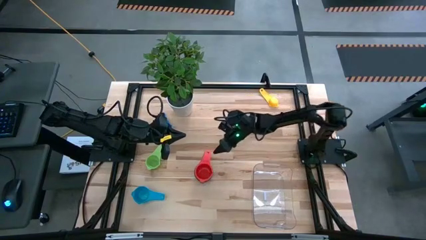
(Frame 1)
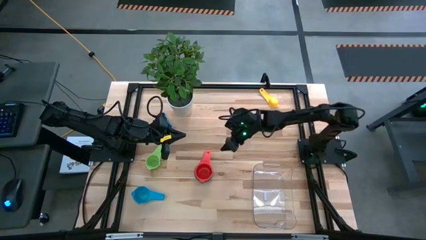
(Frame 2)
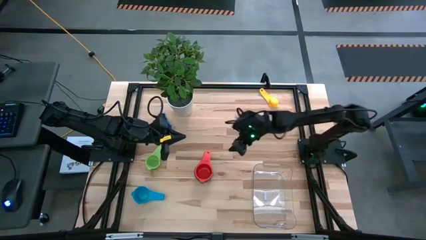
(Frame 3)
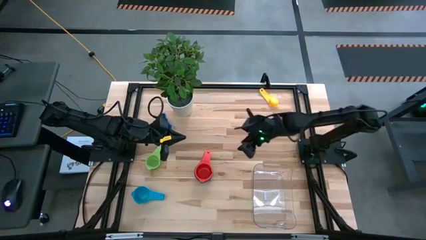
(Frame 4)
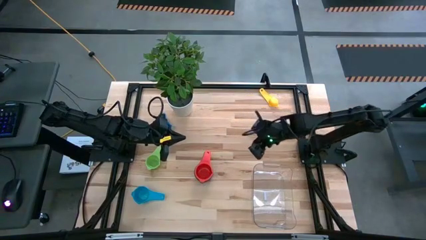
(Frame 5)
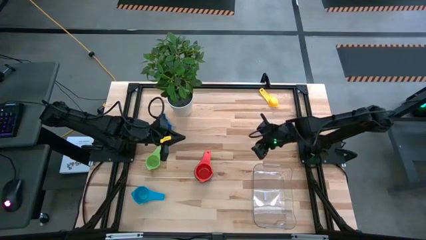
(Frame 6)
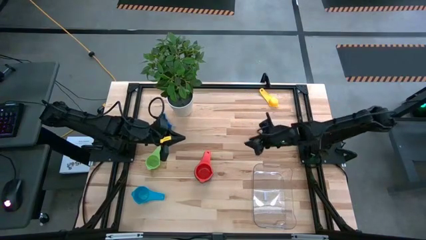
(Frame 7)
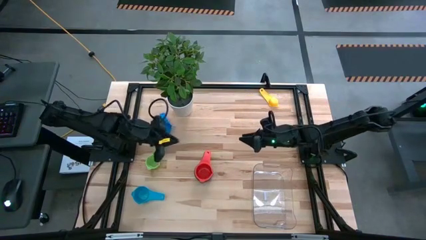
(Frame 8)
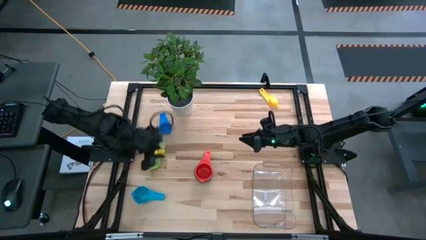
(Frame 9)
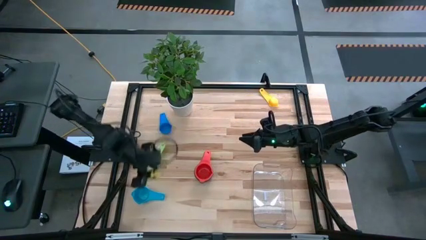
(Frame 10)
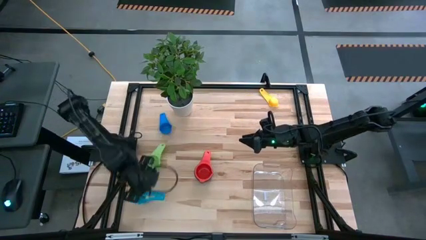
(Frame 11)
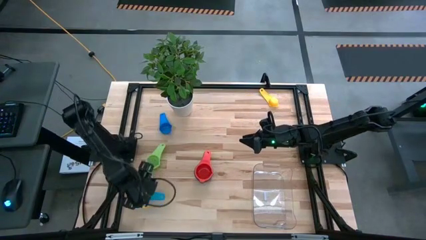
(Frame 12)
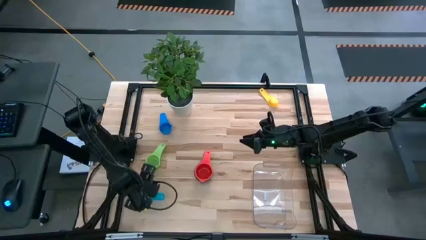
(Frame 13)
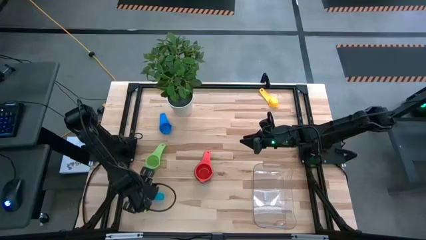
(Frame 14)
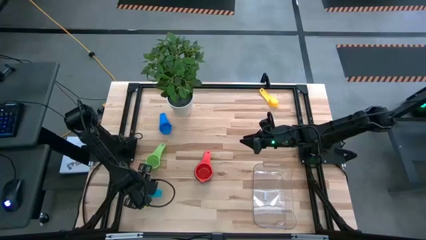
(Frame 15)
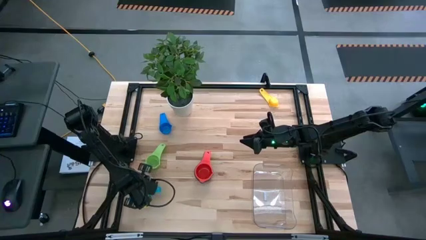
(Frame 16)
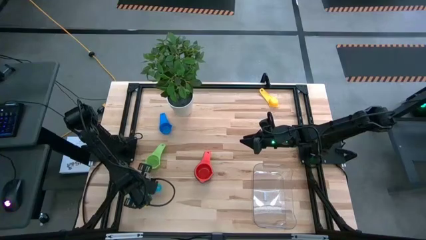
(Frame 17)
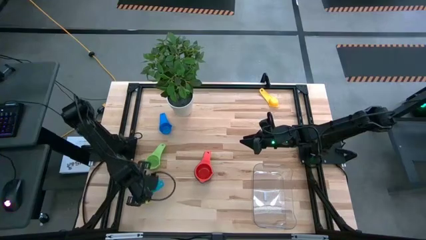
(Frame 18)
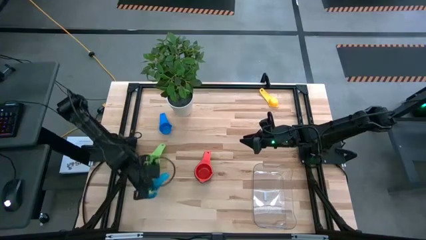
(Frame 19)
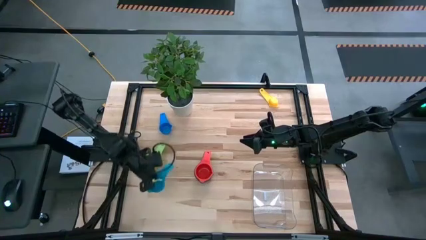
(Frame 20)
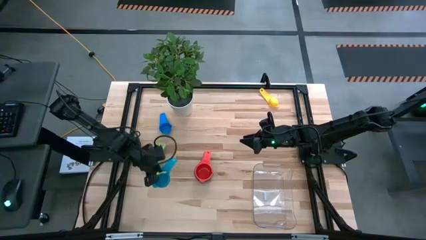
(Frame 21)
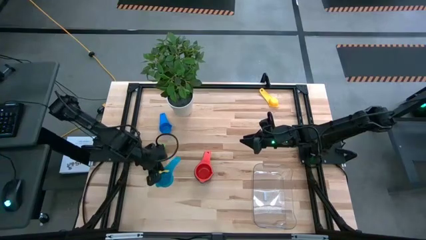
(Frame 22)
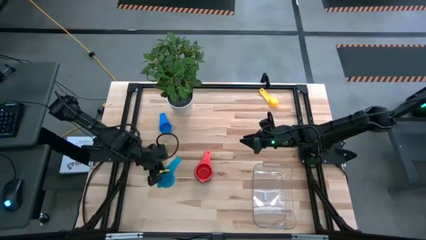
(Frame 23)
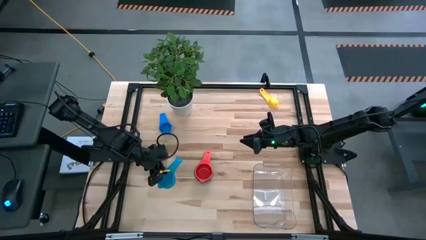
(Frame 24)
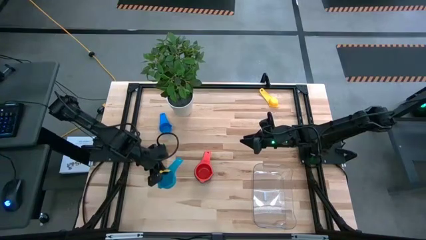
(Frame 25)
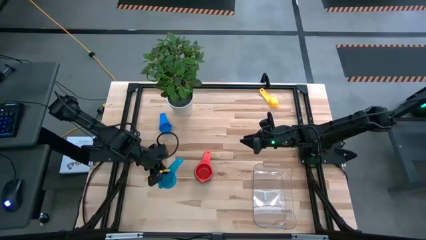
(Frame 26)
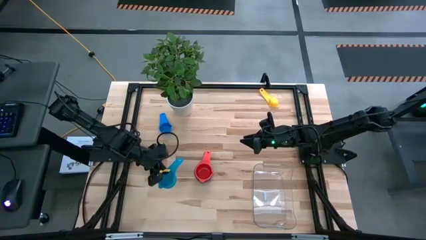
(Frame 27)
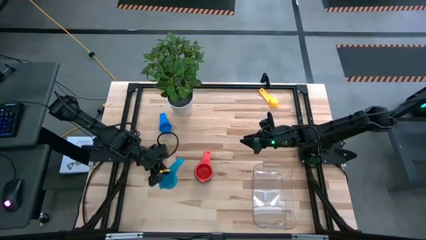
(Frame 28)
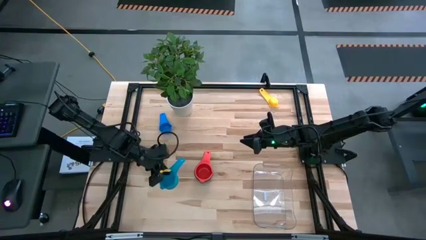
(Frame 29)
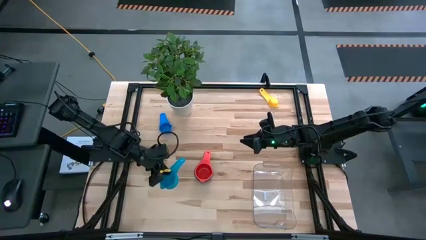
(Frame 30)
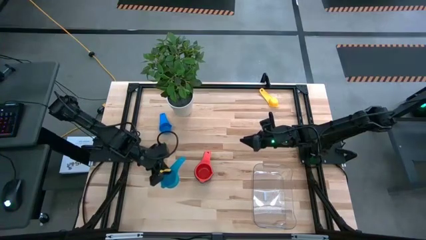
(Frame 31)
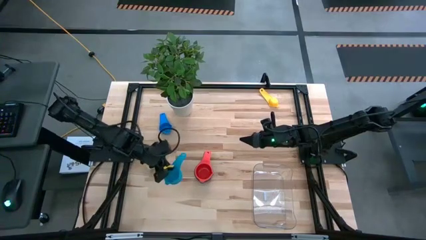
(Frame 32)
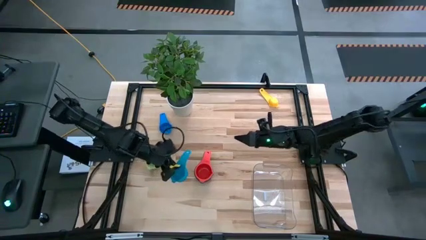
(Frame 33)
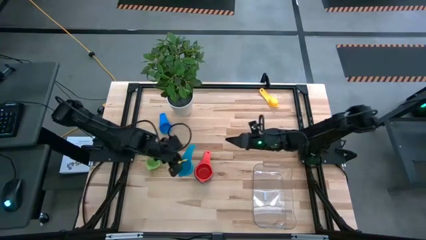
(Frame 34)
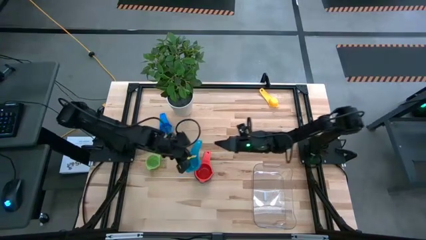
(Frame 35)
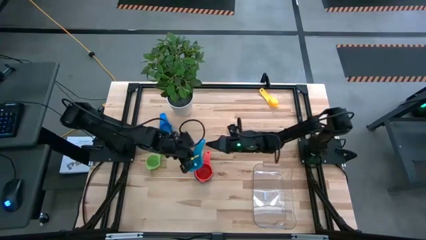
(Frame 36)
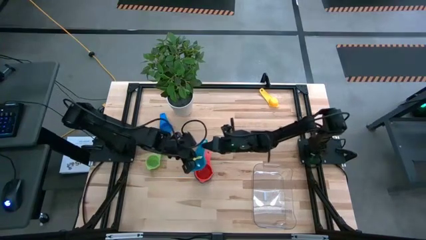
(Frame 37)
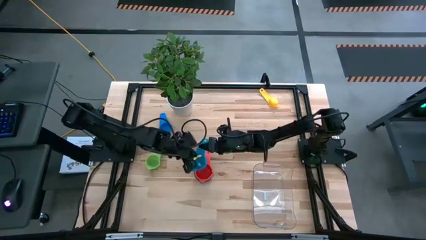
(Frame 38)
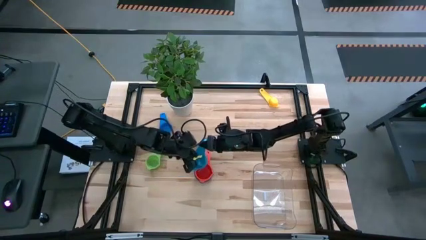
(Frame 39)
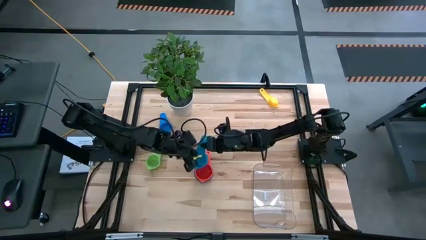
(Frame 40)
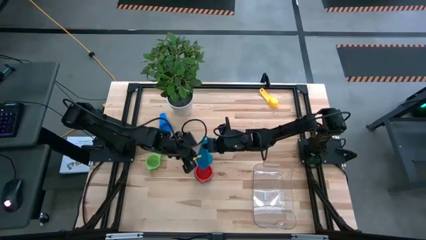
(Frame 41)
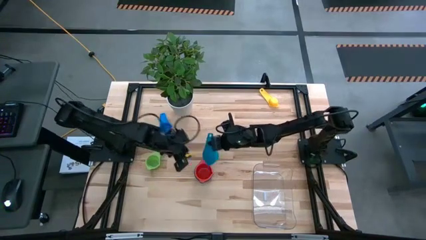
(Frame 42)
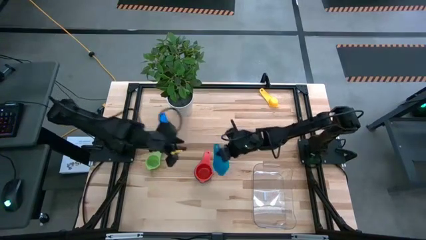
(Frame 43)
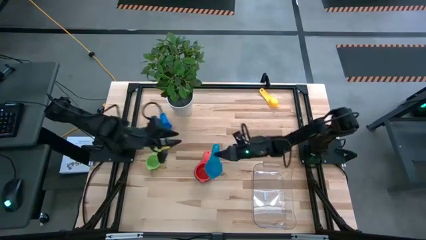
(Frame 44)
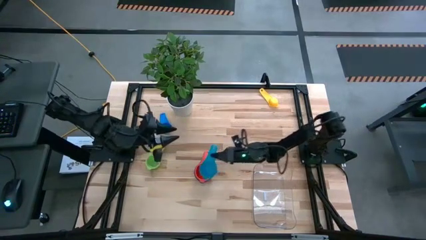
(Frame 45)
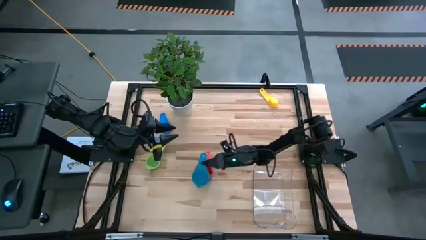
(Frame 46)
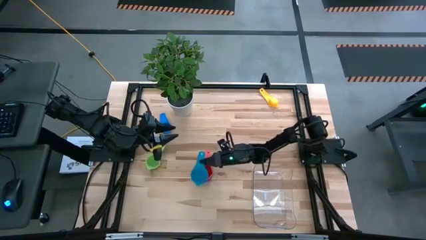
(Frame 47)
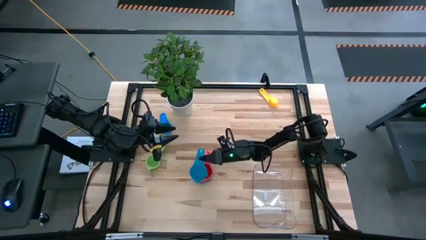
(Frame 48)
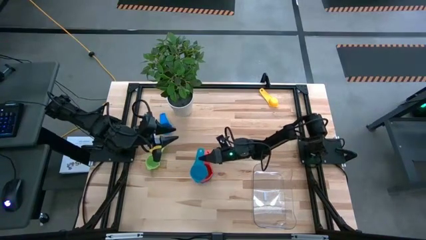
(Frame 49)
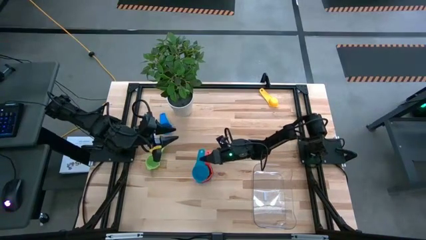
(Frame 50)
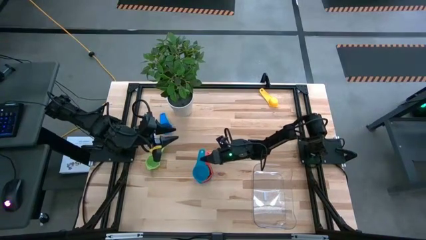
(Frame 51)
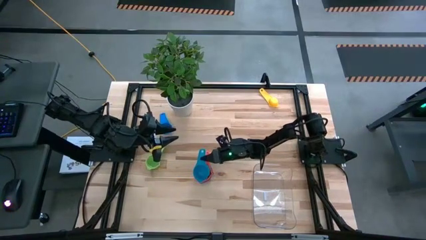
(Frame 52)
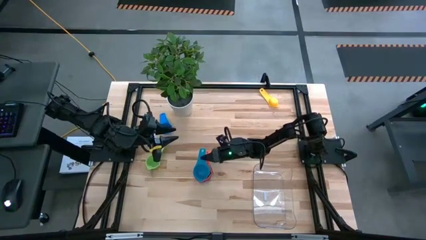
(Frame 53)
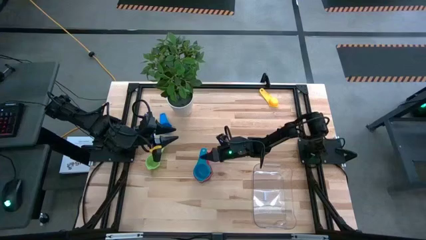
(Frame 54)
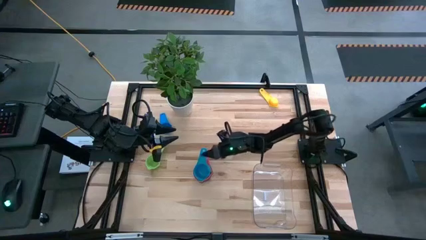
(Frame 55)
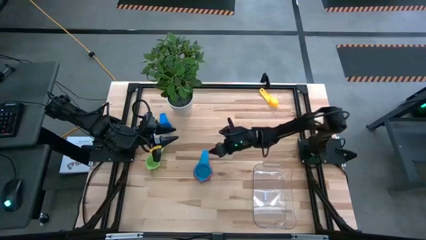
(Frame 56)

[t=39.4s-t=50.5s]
Task: Nest measuring cups in basket
Stack the light blue measuring cup on top of the red measuring cup
